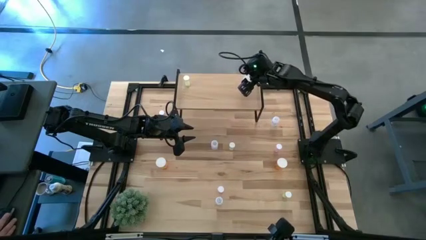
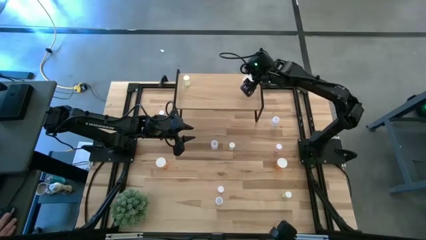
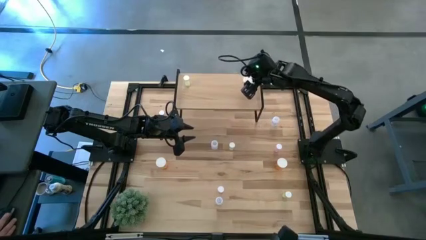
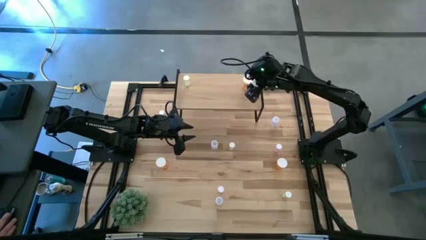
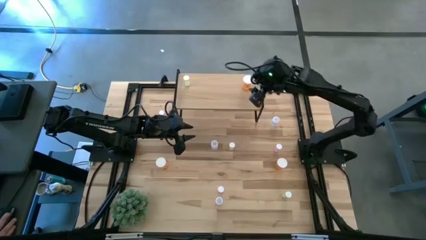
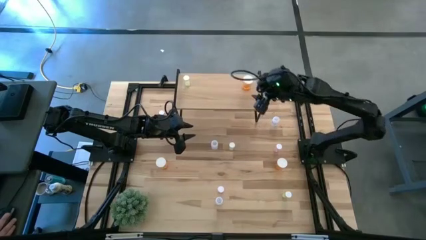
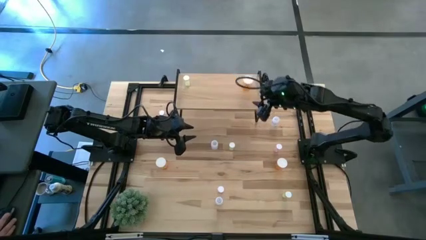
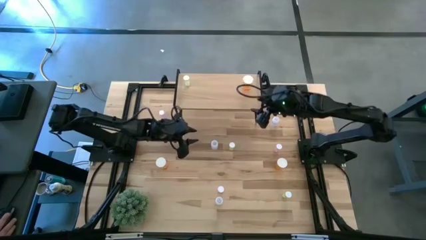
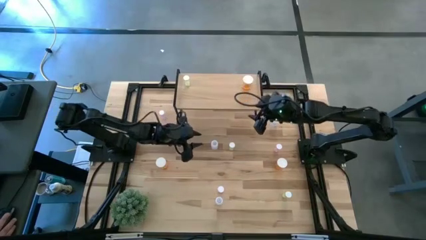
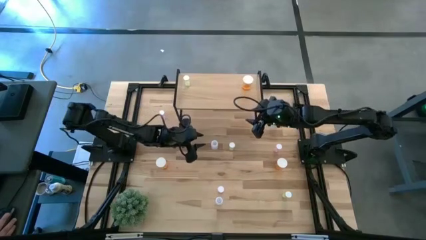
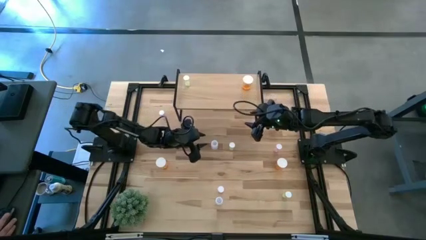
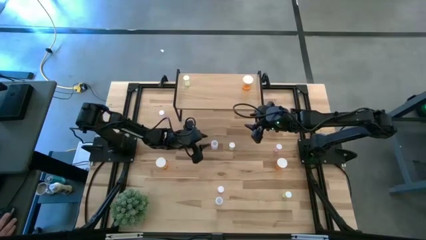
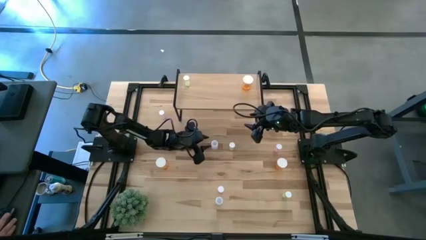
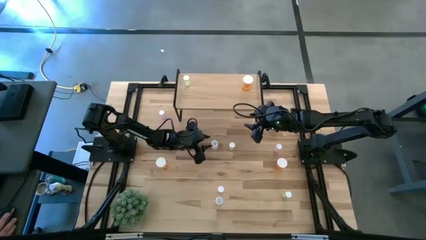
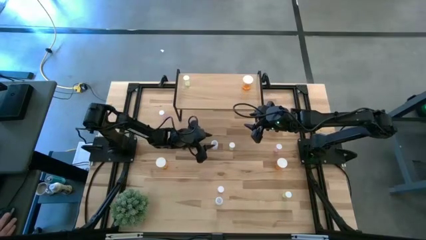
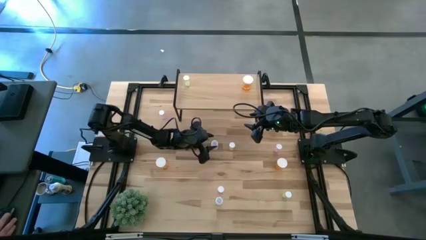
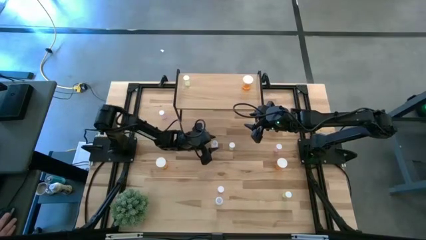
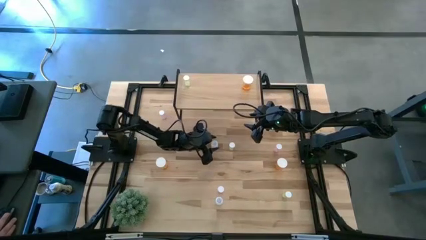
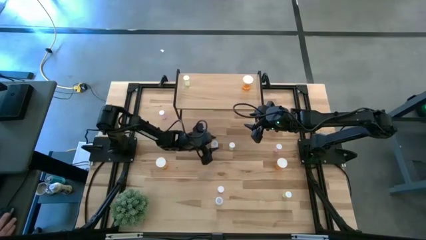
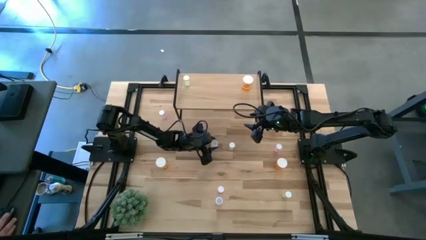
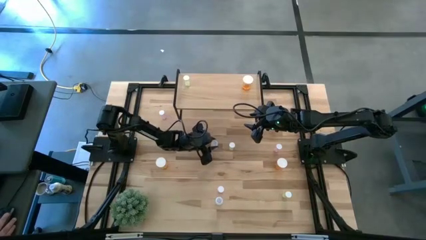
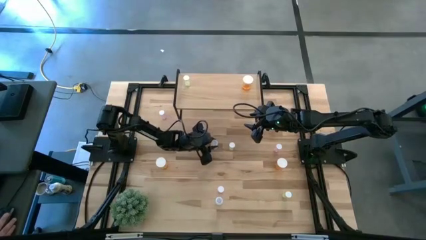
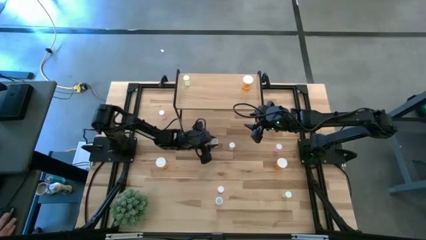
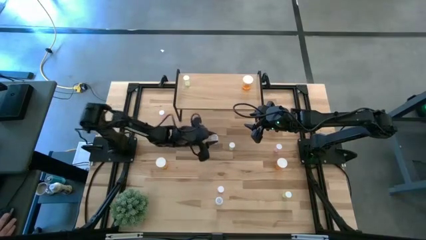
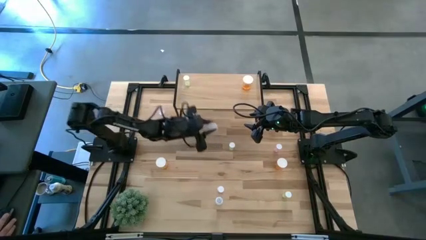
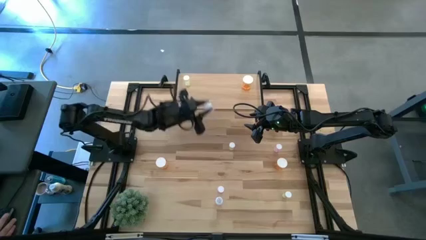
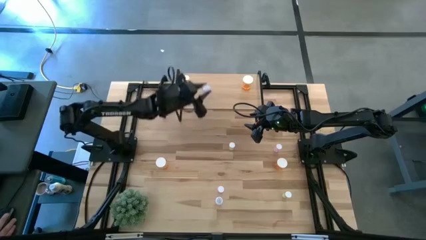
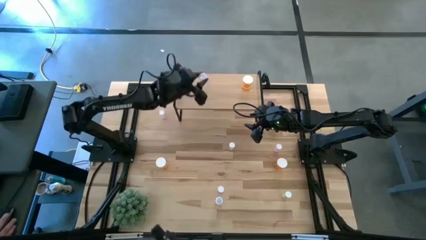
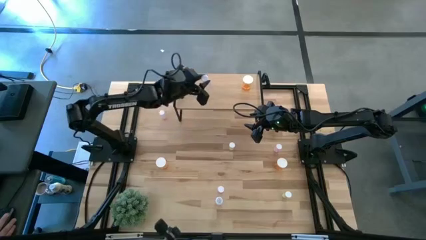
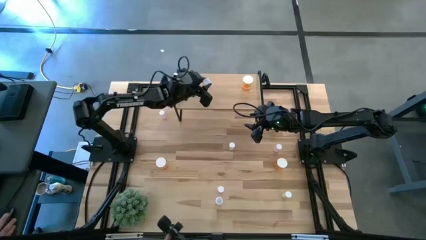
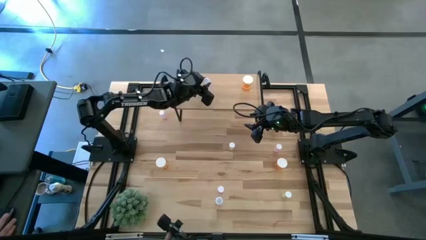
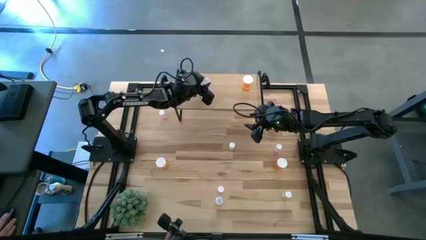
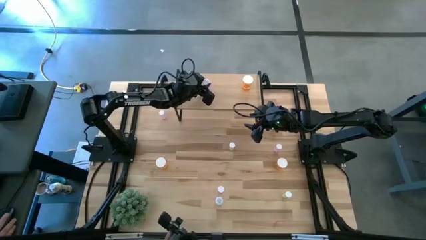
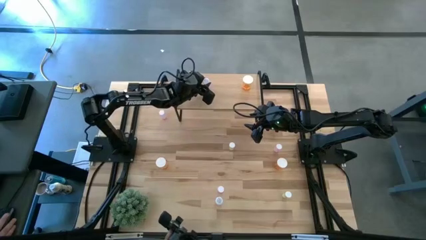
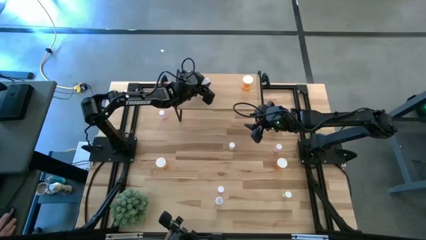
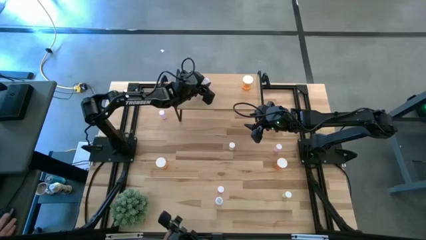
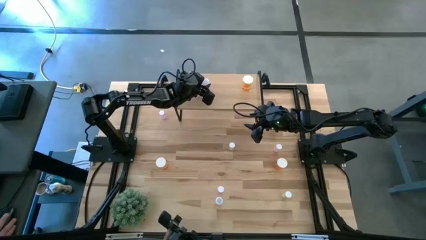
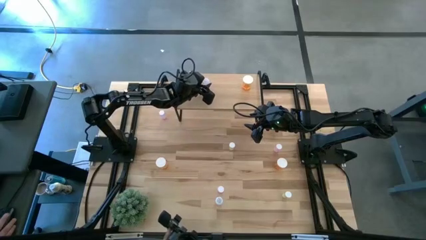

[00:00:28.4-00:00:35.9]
Task: Pick and place medicine bottles onto shelf by color
Put the top left white pill bottle on the shelf

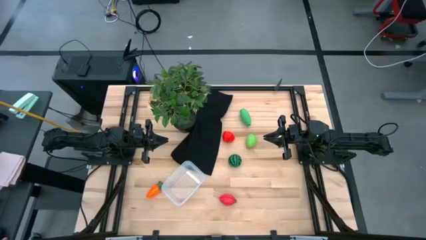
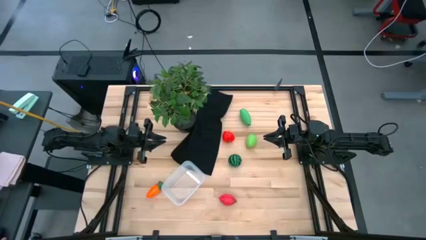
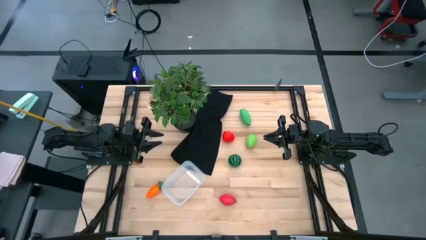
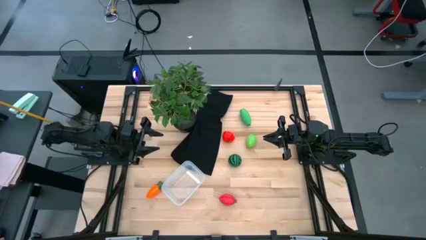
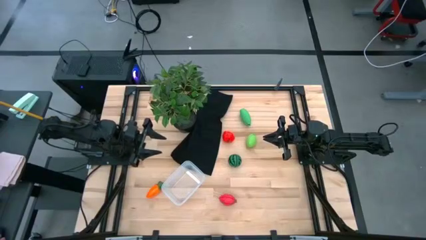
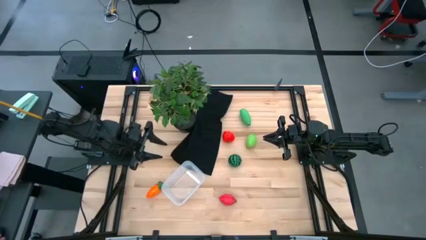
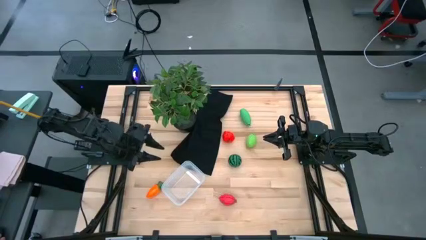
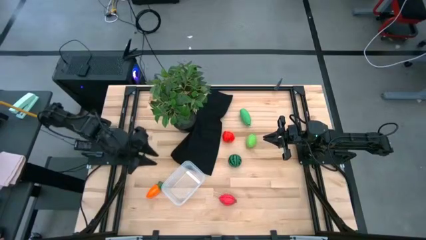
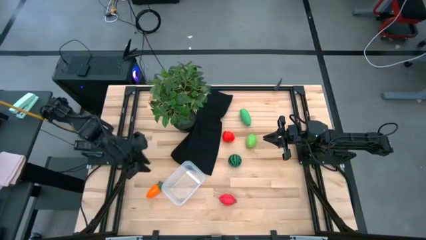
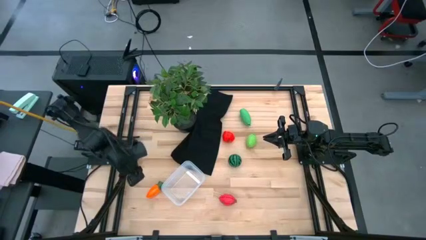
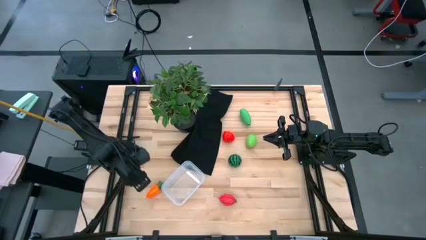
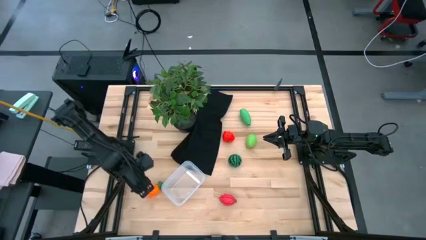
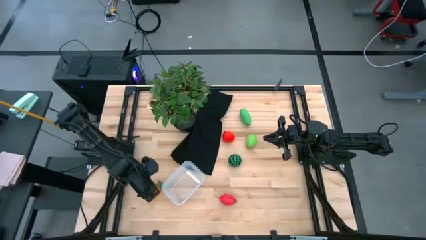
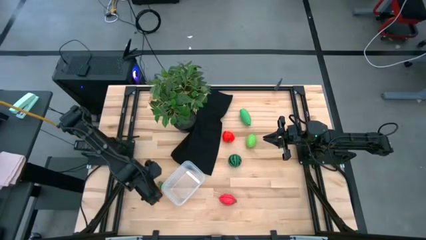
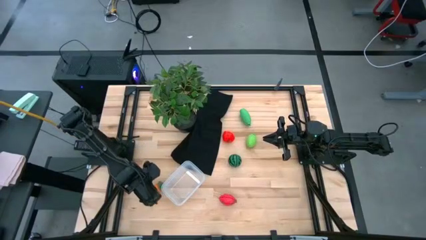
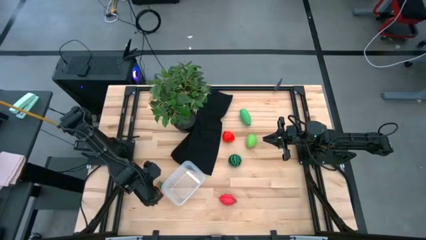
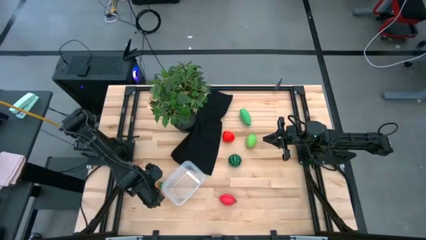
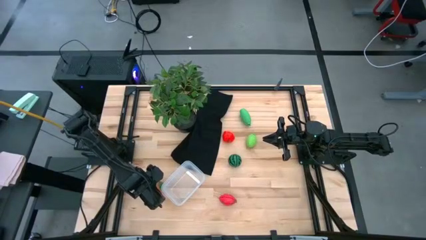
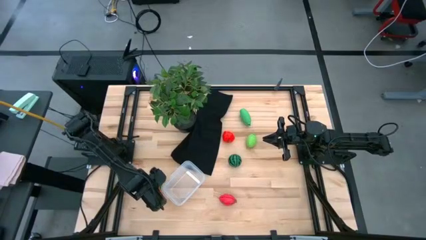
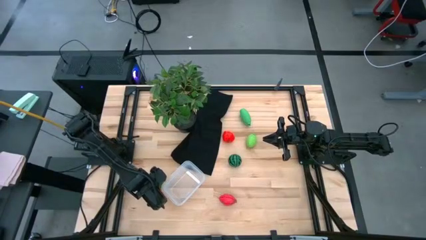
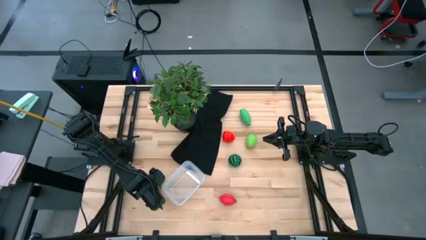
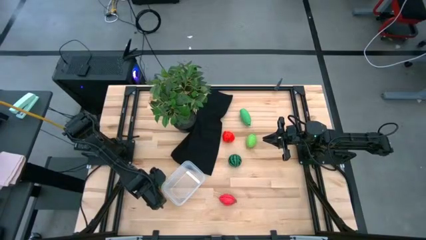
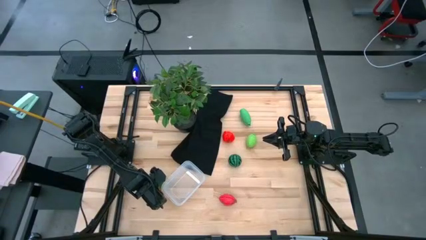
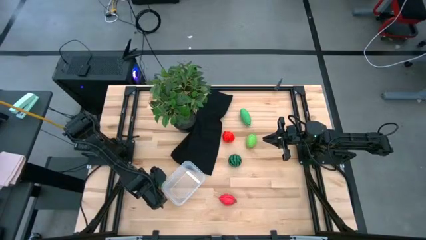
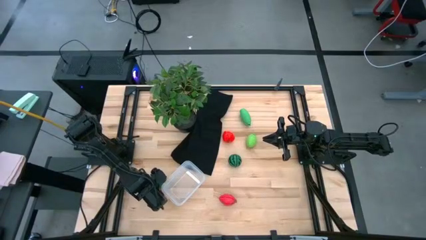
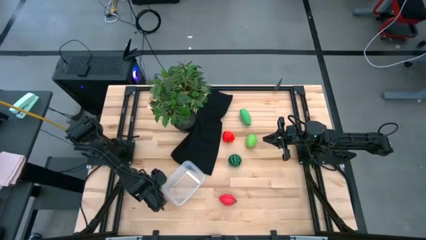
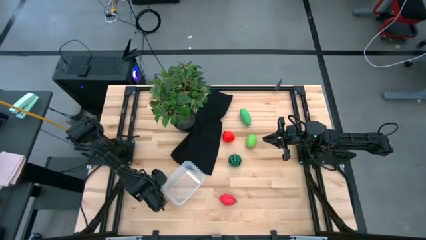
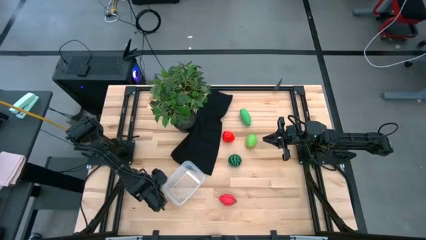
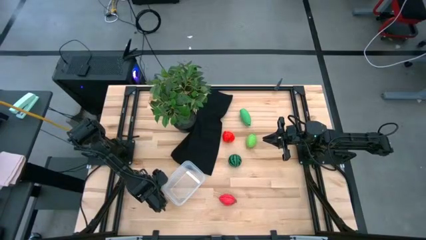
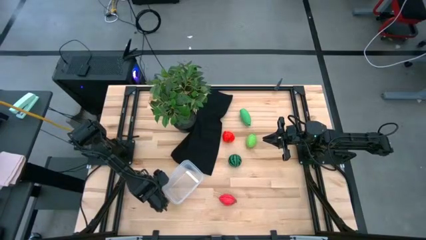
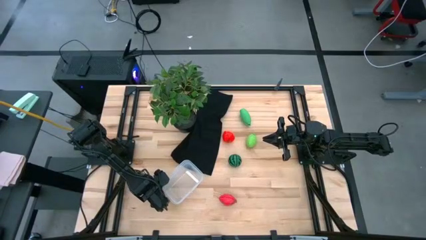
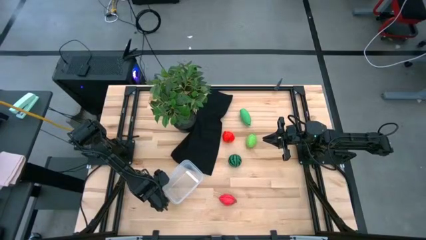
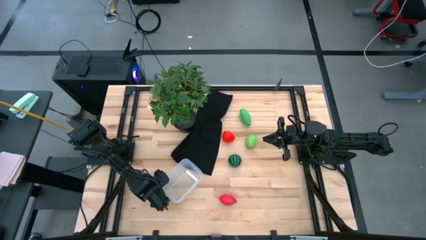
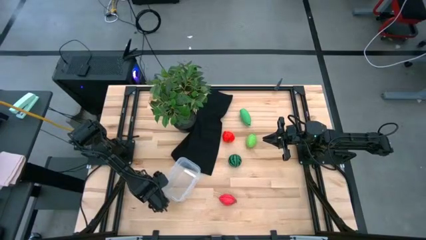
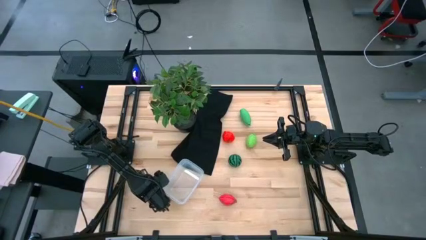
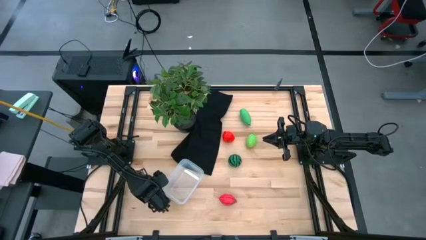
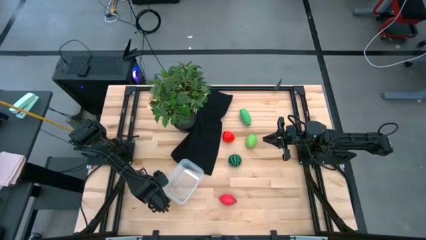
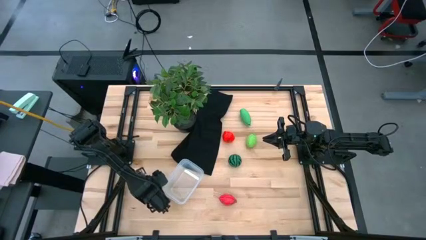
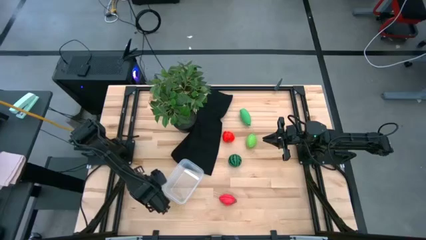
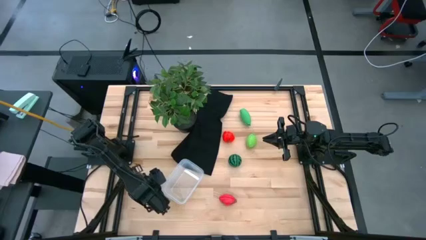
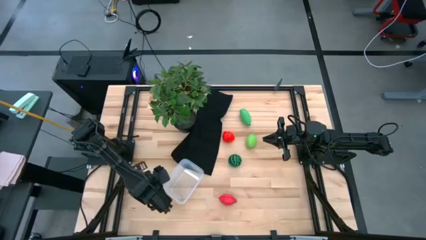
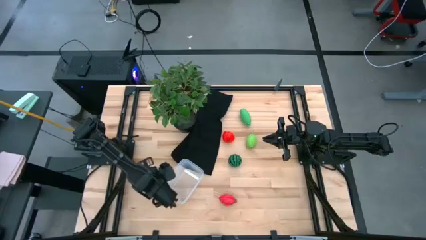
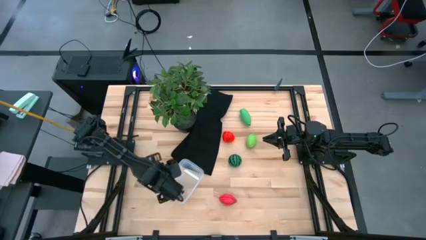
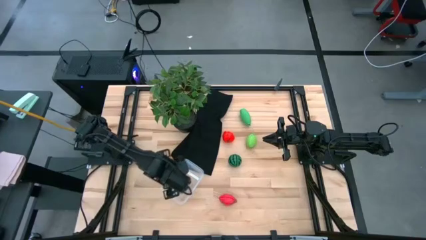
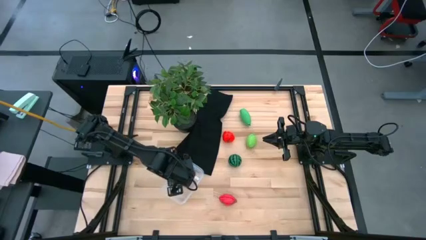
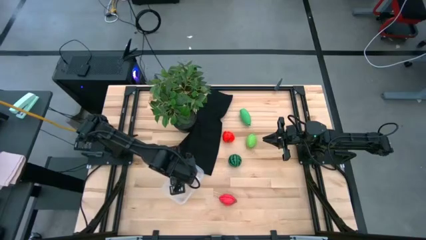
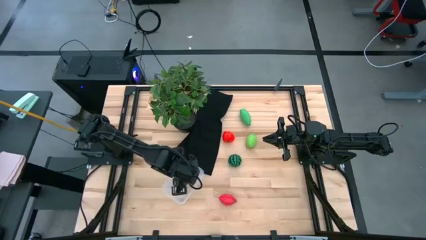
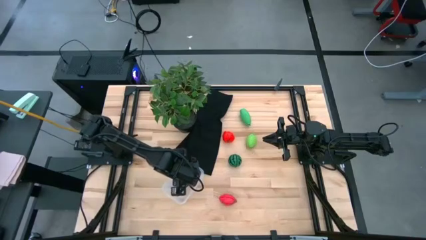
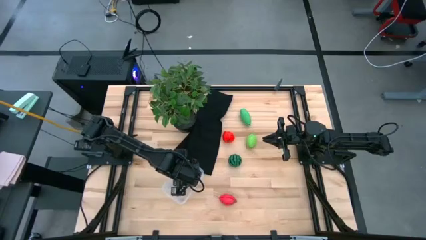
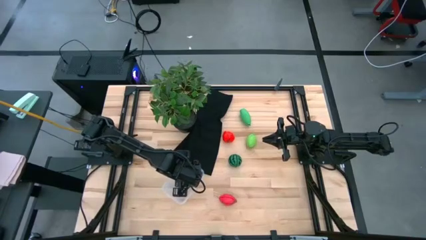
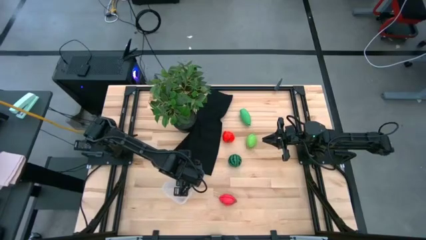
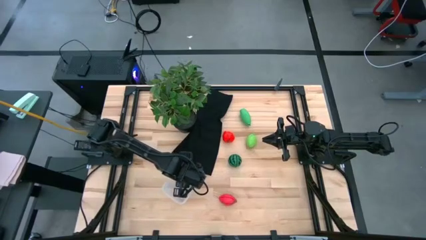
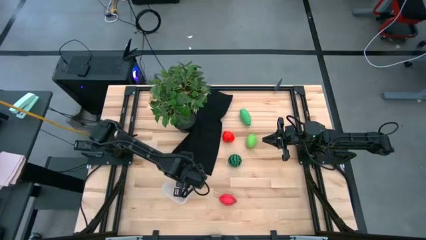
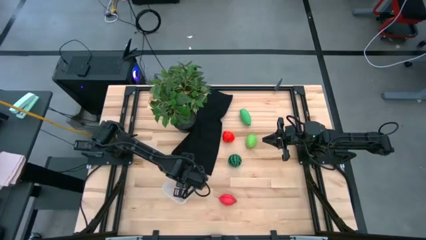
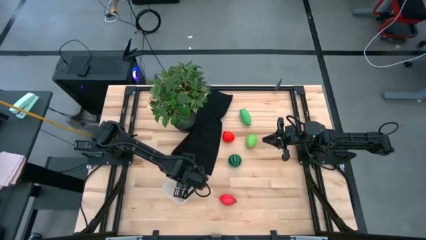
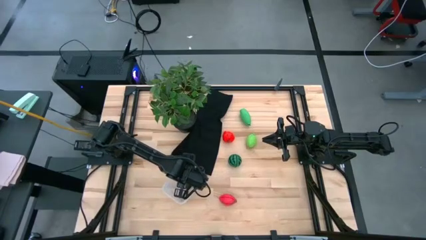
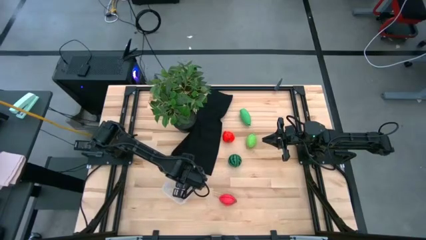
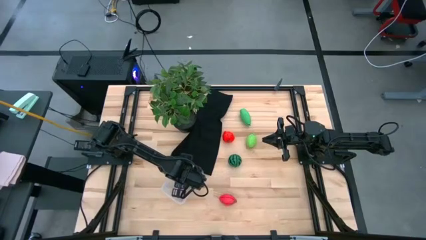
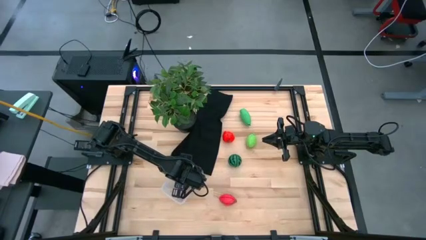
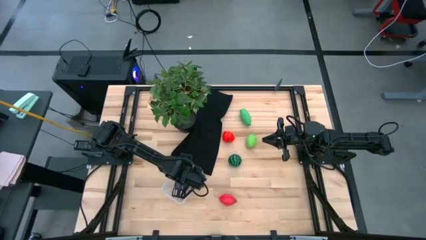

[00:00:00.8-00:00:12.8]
Task: Pick and placing Produce into tupperware
Put the orange carrot into the transparent bin
